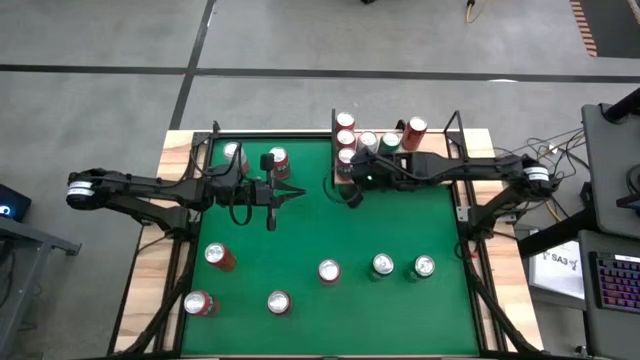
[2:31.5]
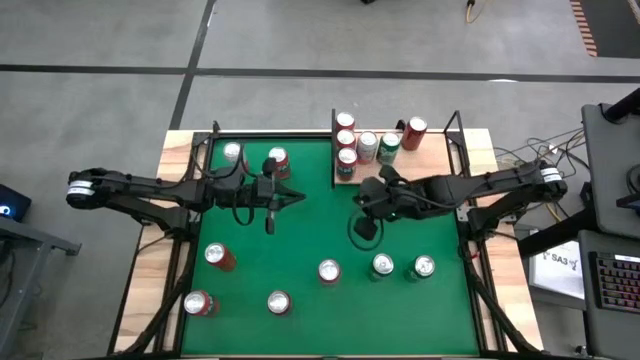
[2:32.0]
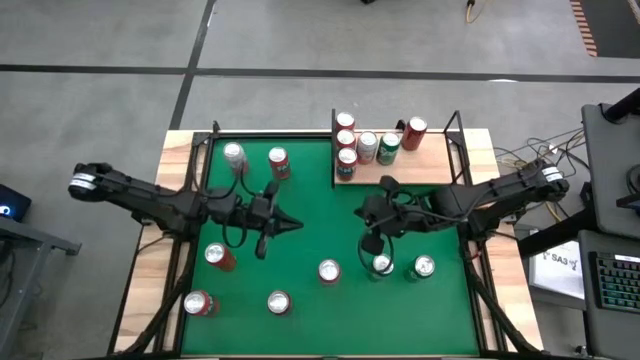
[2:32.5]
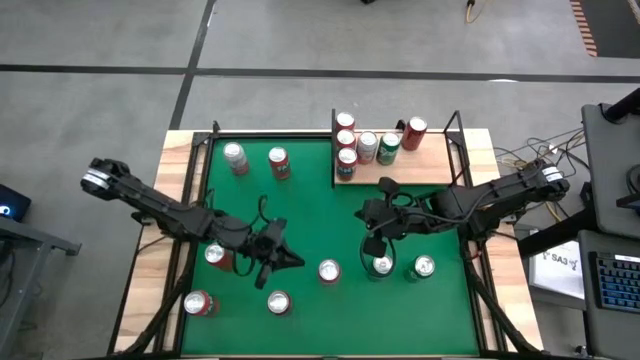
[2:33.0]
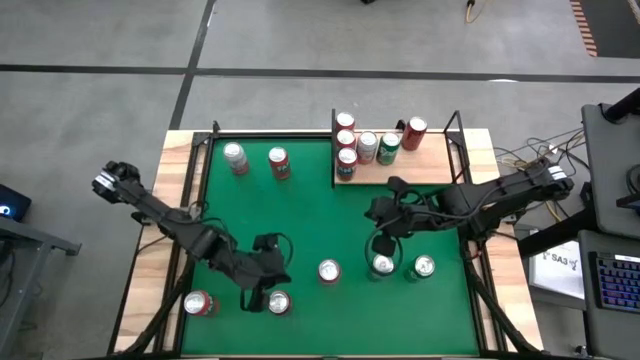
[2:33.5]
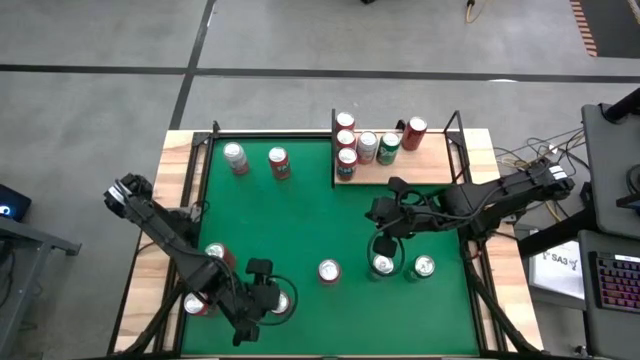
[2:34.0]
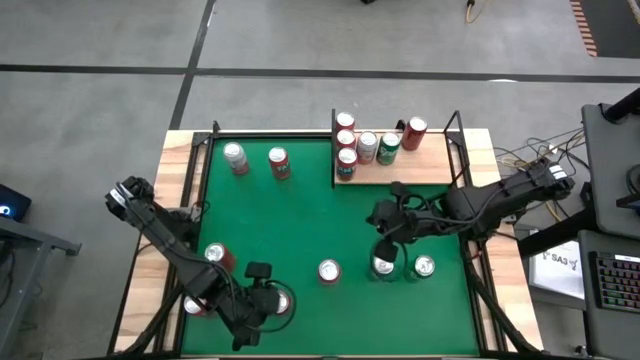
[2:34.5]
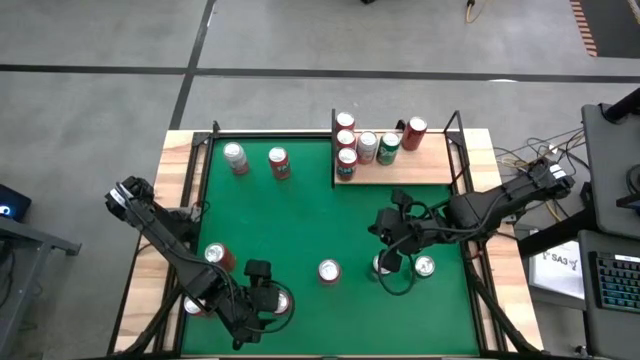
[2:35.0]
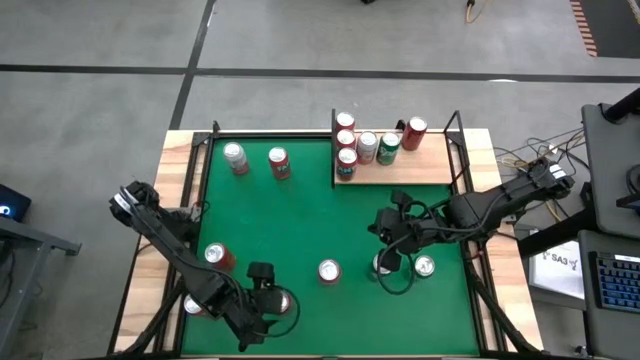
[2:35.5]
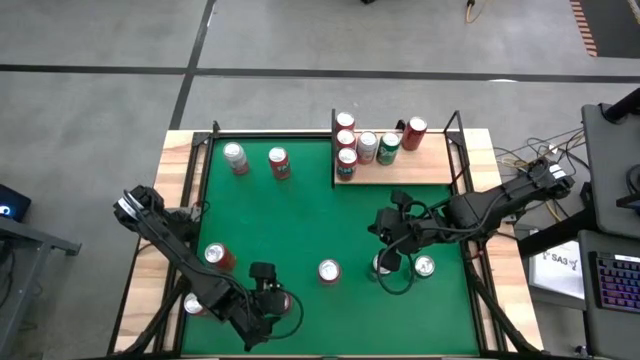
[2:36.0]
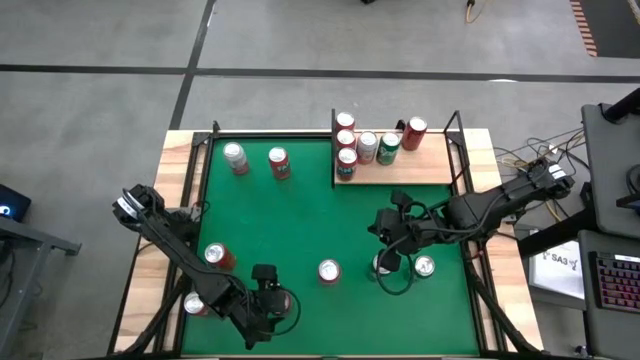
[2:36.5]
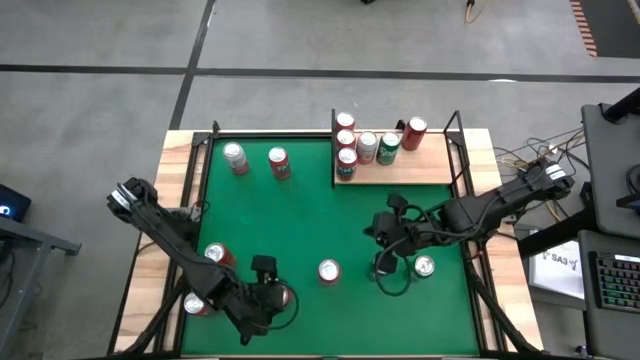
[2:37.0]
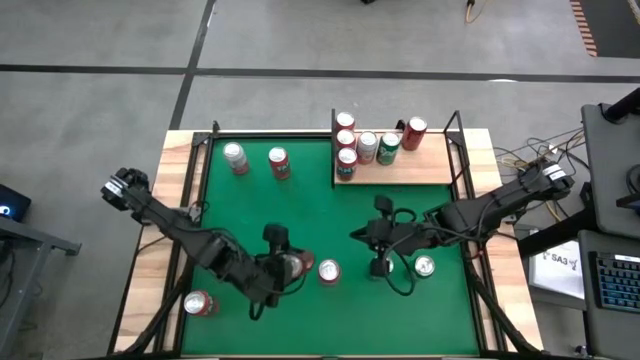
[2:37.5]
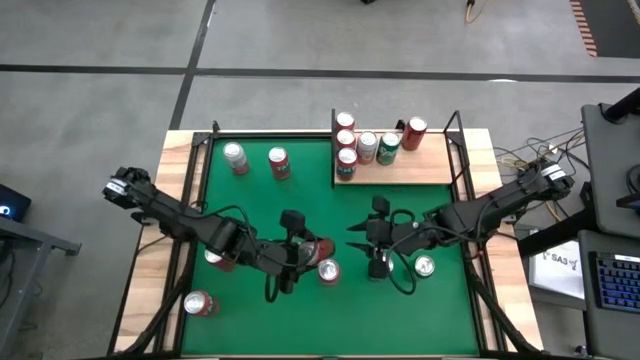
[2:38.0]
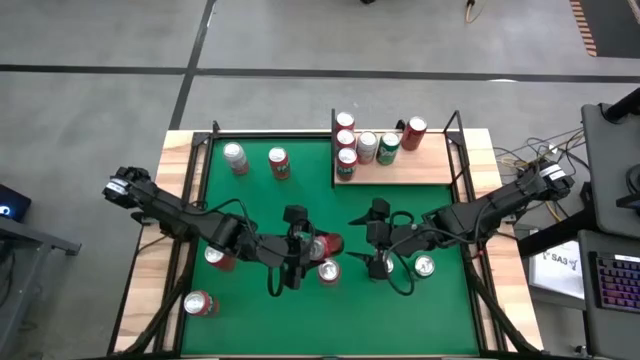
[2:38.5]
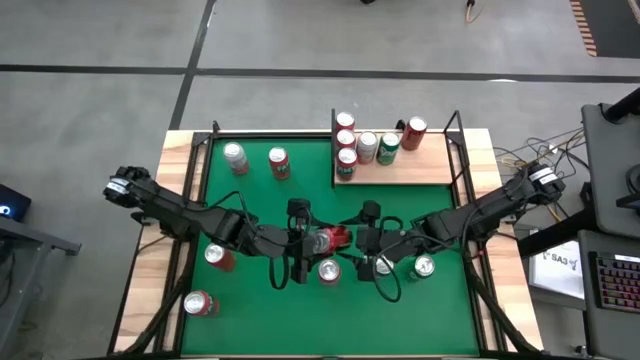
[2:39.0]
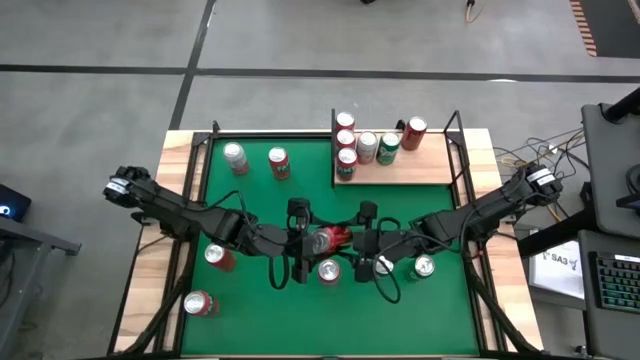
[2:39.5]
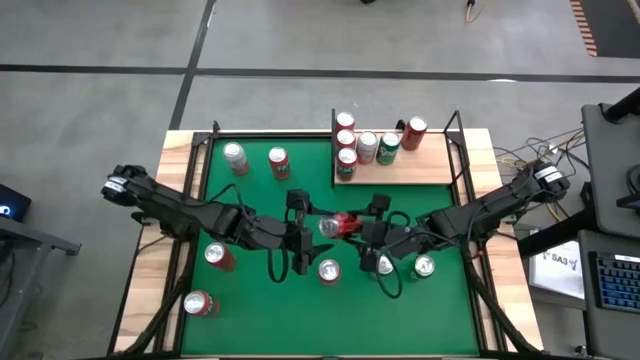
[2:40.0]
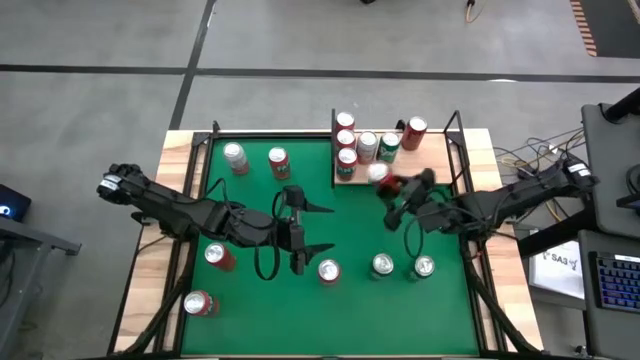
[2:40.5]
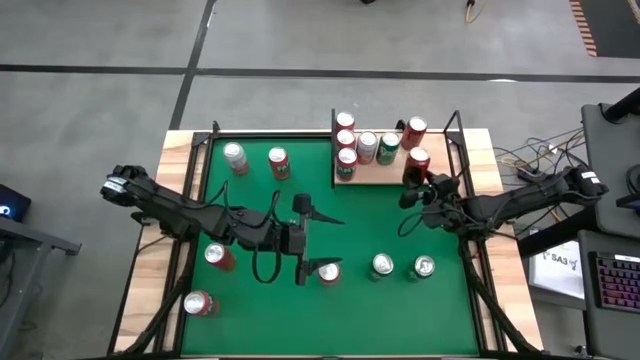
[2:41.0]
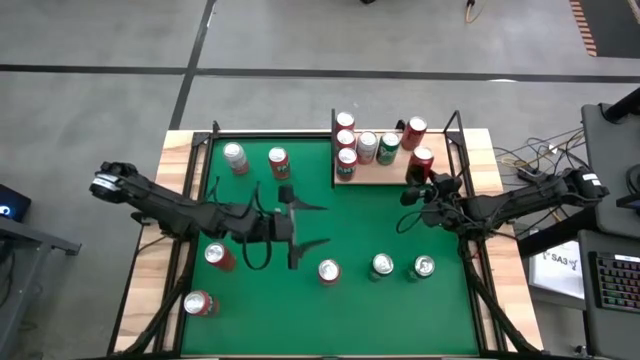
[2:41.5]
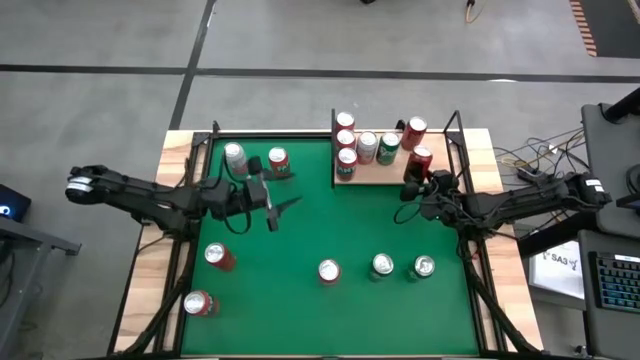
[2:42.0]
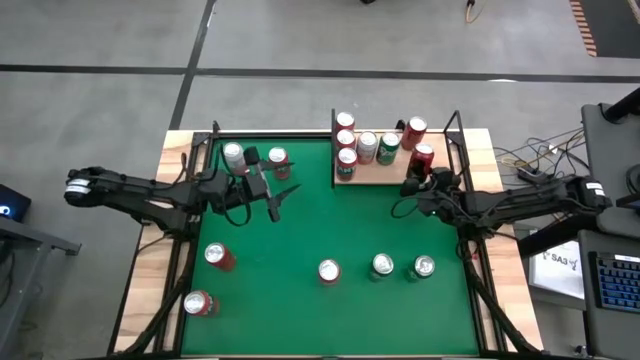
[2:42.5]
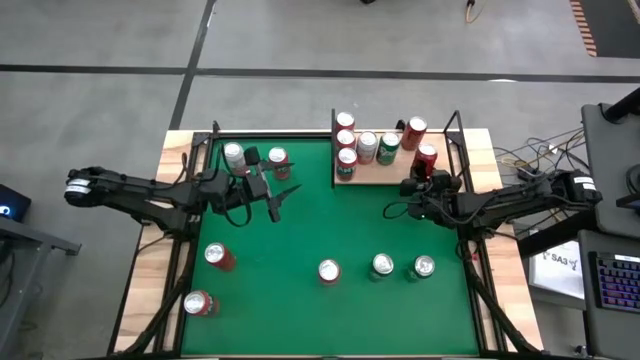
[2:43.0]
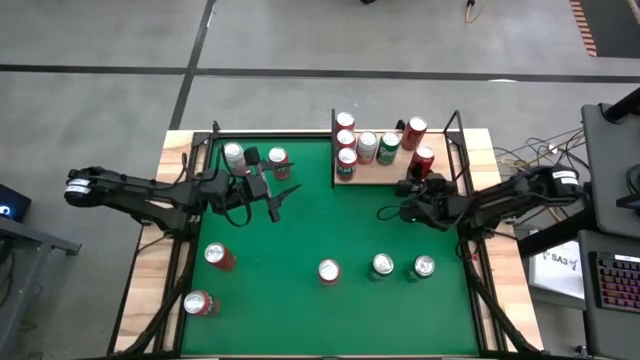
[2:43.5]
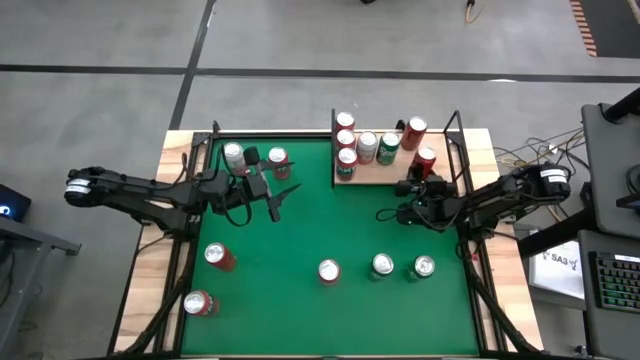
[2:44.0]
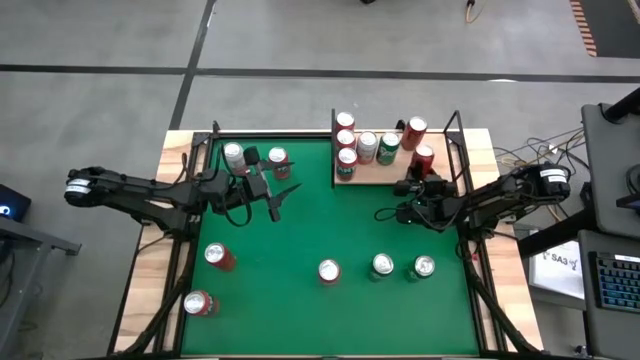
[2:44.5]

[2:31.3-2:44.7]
Task: Place canned beverage on shelf
Put the bottom red/black soda can on the shelf aligned with the other red/black soda can

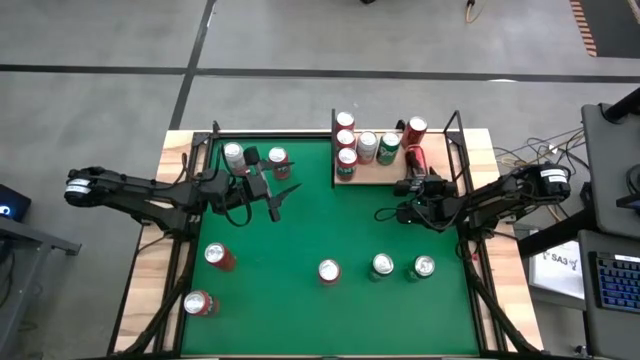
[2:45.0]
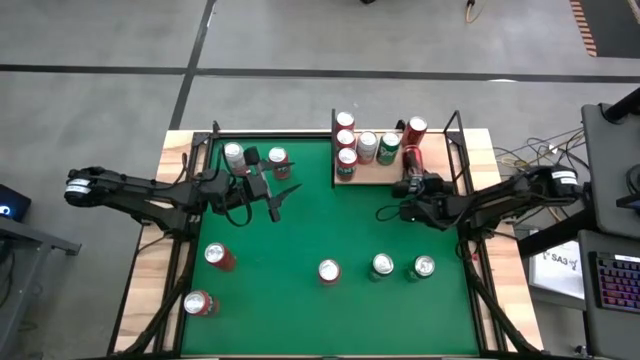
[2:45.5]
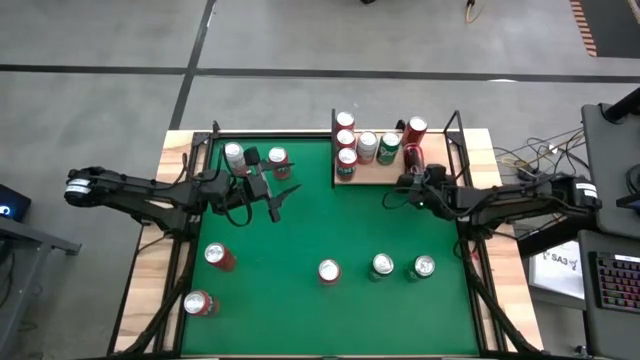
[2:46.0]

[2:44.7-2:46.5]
Put the bottom red/black soda can on the shelf aligned with the other red/black soda can

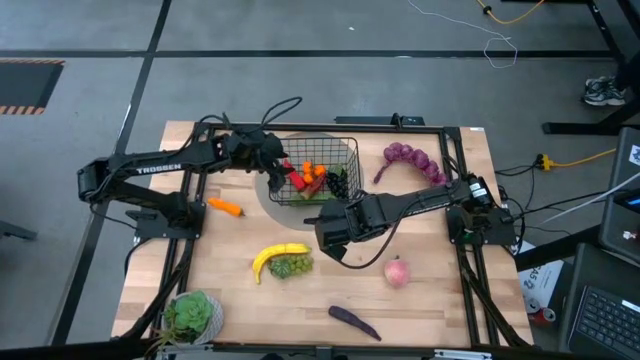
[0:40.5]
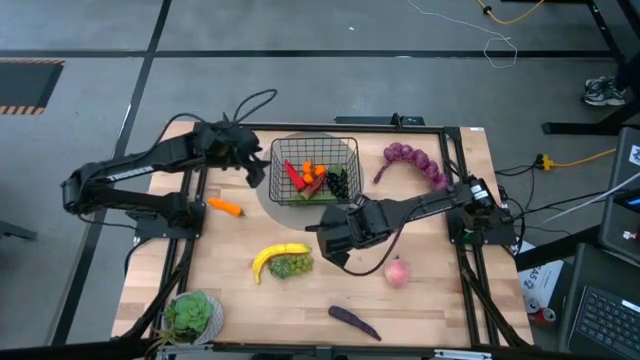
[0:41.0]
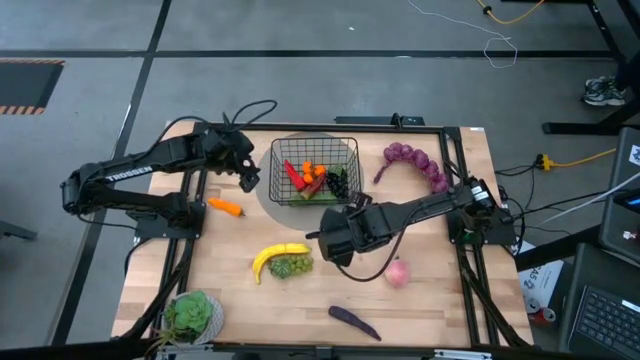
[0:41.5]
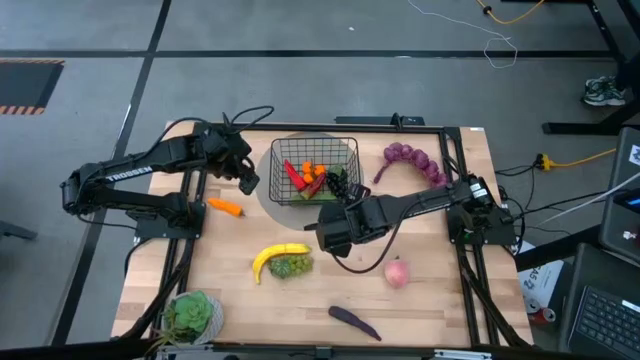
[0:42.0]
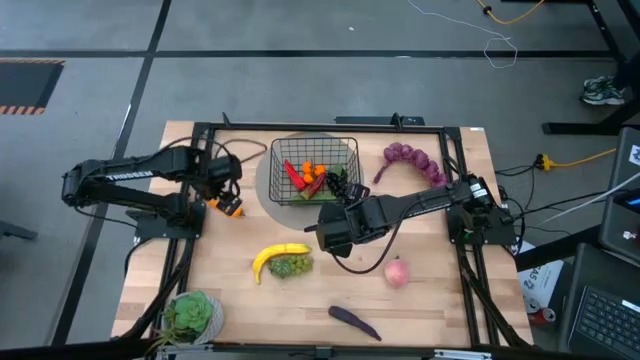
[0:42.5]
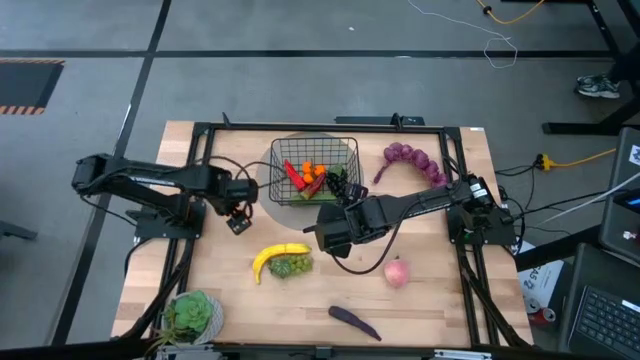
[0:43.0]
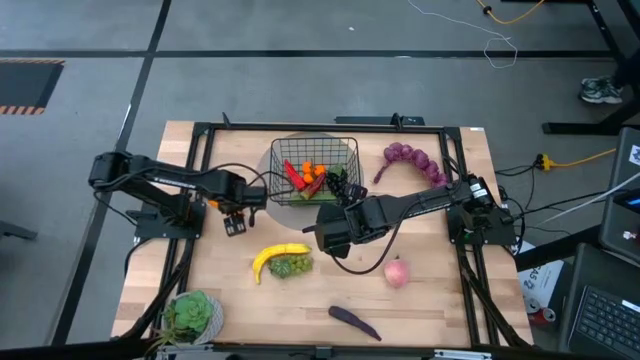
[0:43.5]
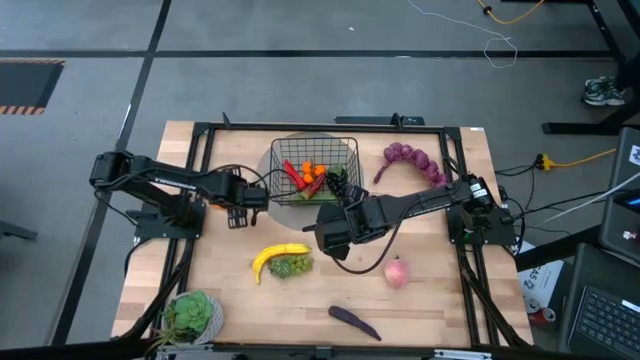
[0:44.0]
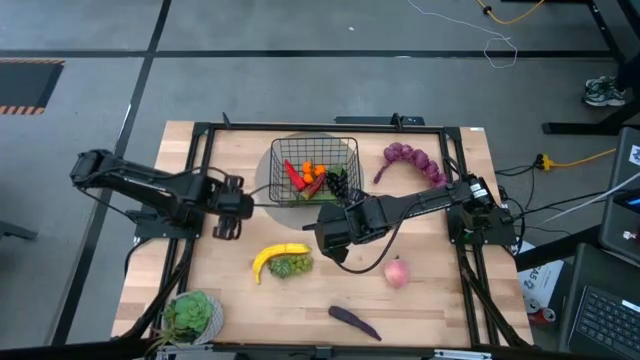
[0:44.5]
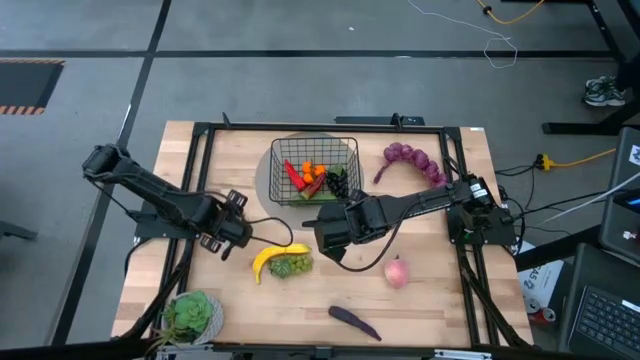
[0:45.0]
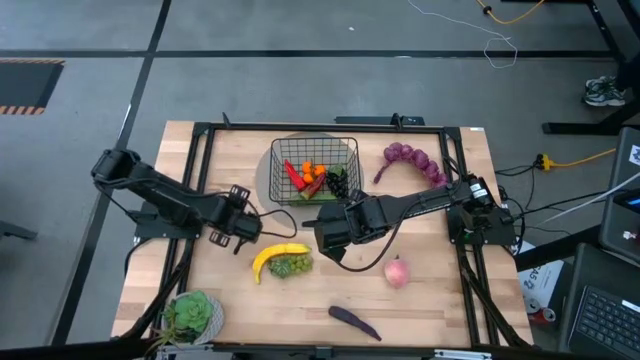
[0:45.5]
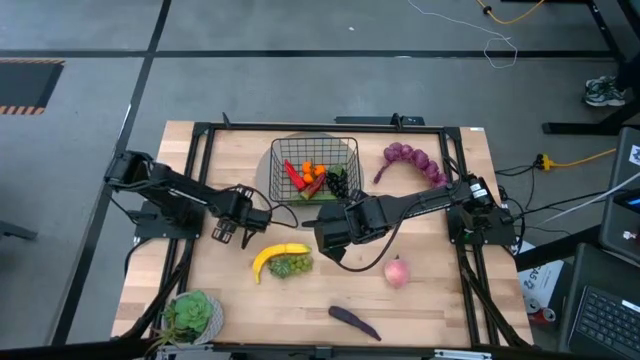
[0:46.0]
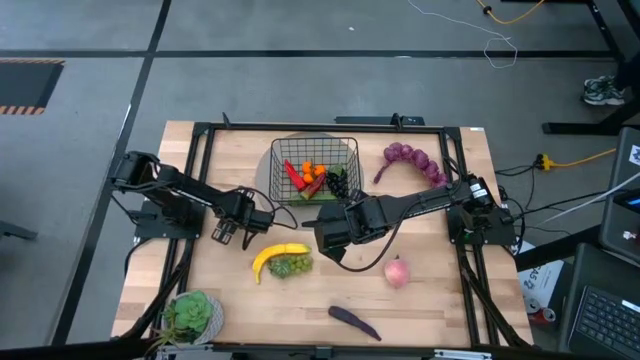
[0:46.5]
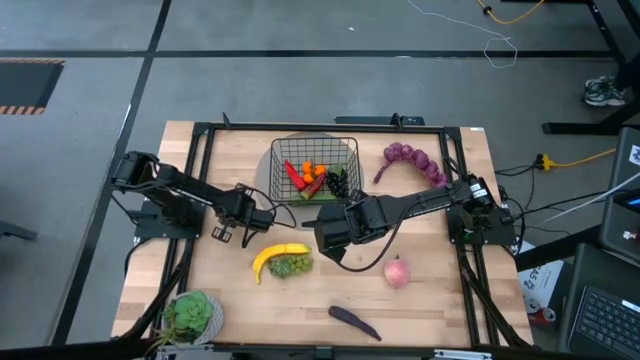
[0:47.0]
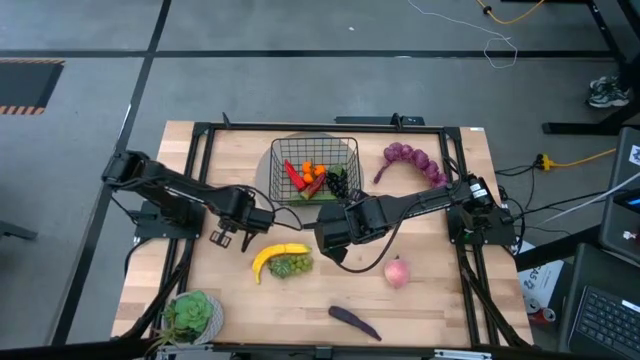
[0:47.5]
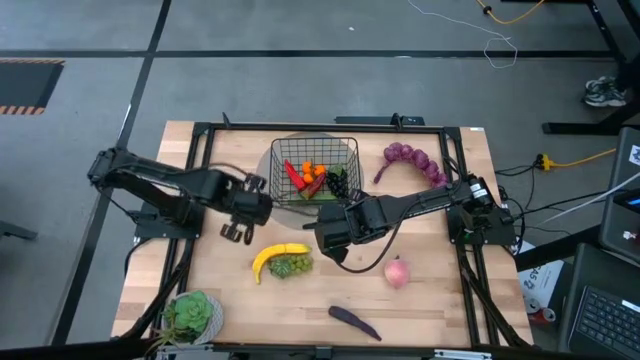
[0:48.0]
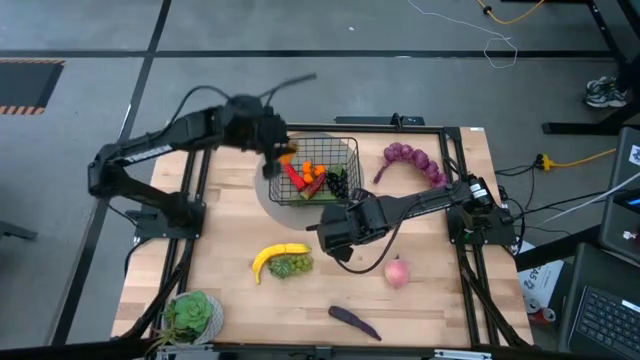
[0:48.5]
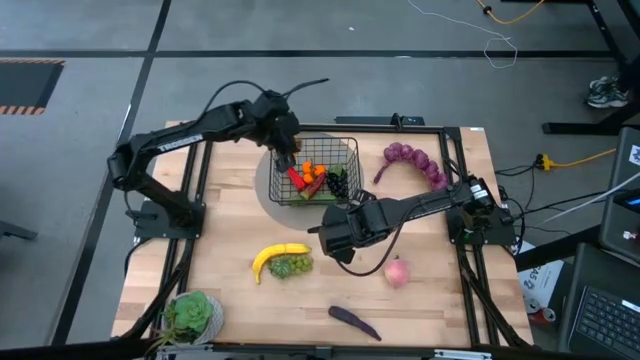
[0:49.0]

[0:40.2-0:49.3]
Task: Build produce basket
Put the yellow chili pepper into the wire basket
